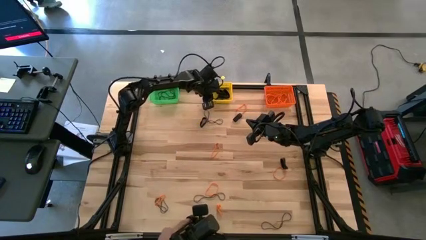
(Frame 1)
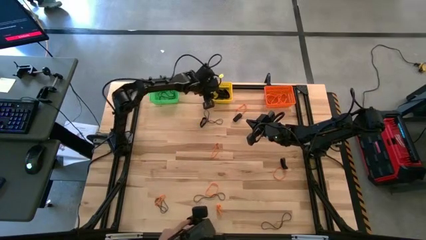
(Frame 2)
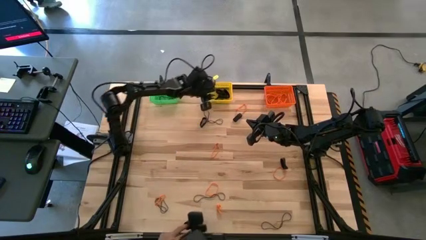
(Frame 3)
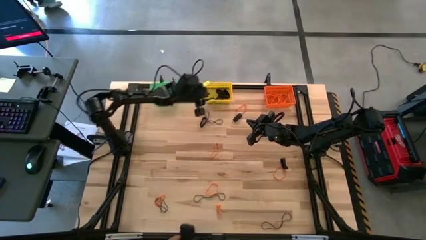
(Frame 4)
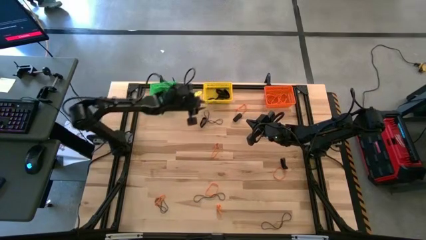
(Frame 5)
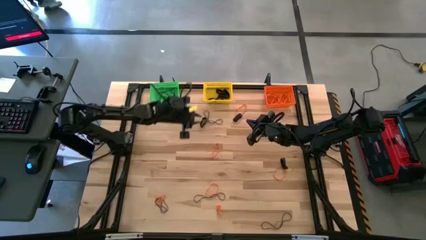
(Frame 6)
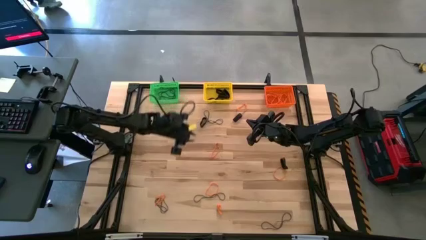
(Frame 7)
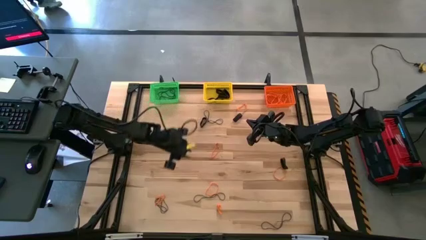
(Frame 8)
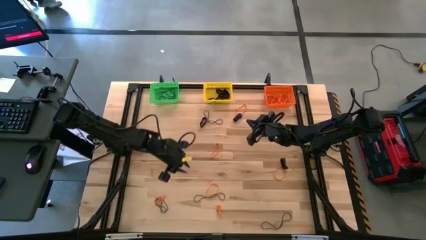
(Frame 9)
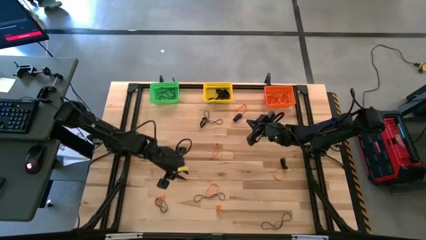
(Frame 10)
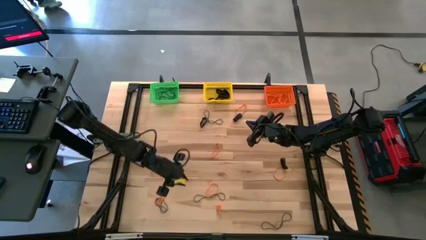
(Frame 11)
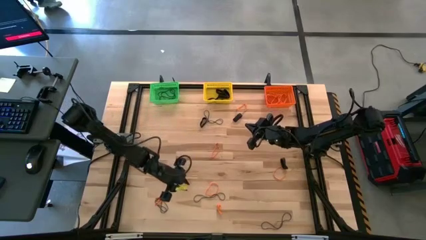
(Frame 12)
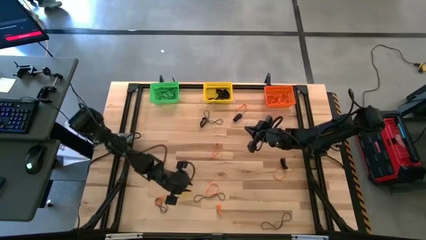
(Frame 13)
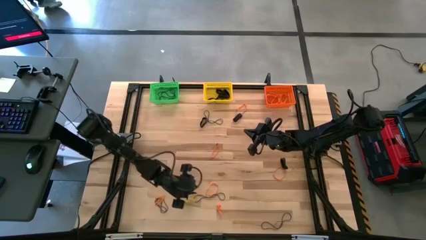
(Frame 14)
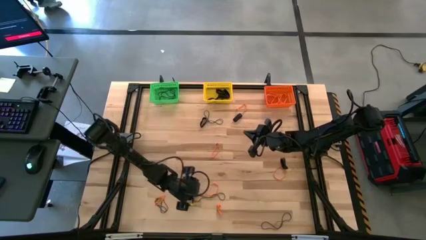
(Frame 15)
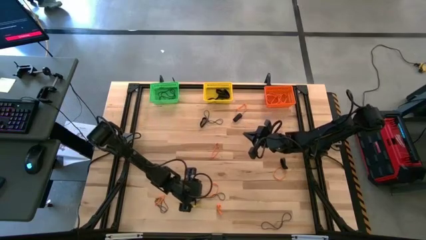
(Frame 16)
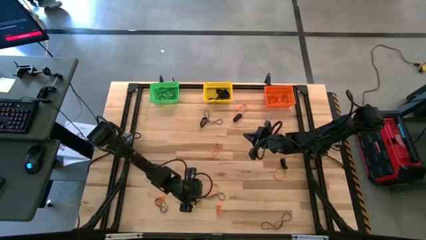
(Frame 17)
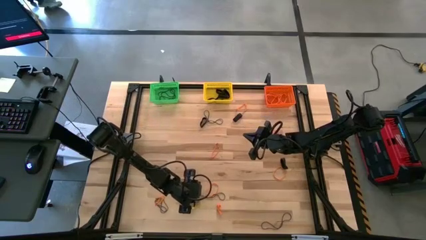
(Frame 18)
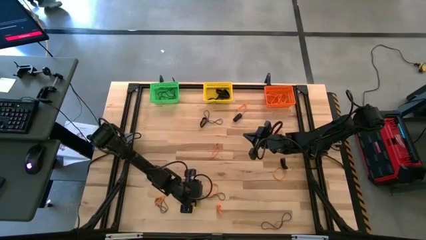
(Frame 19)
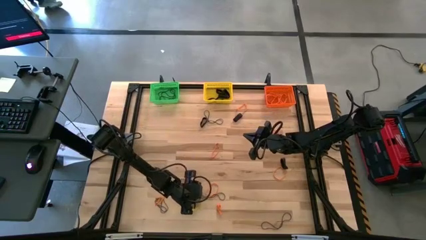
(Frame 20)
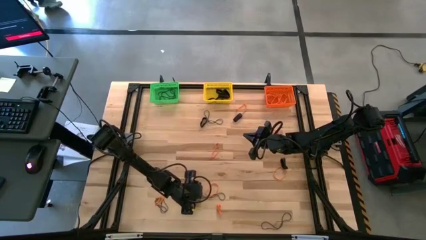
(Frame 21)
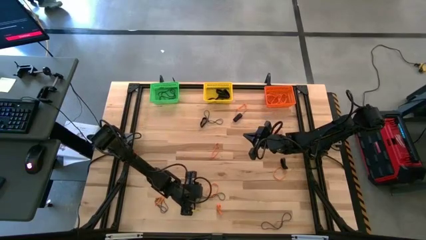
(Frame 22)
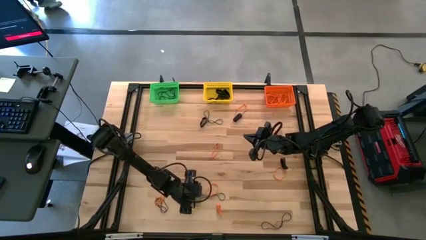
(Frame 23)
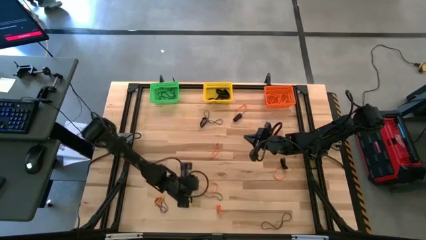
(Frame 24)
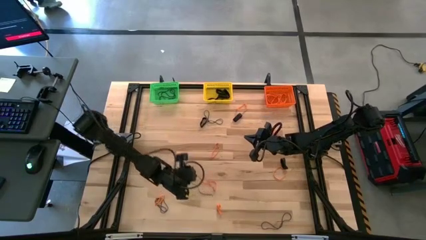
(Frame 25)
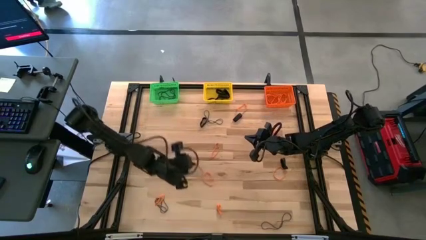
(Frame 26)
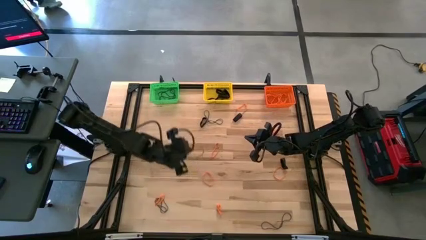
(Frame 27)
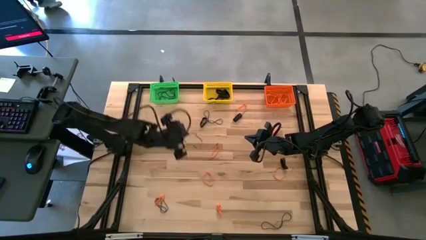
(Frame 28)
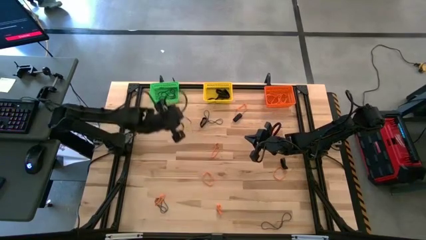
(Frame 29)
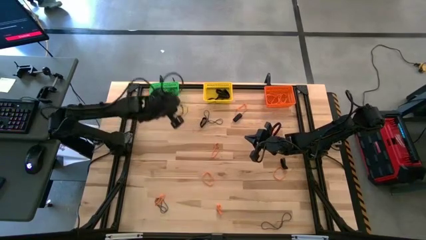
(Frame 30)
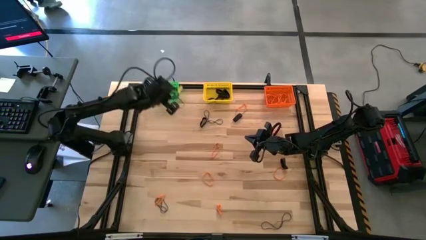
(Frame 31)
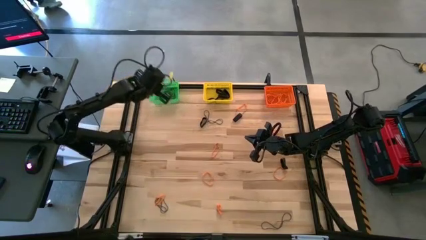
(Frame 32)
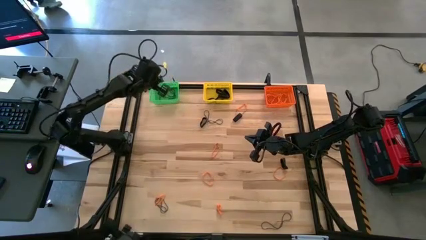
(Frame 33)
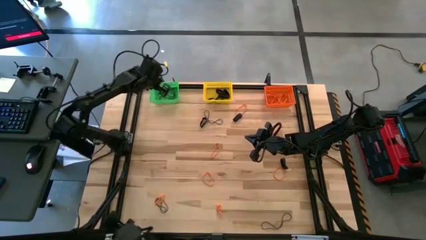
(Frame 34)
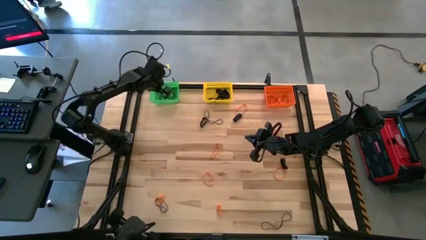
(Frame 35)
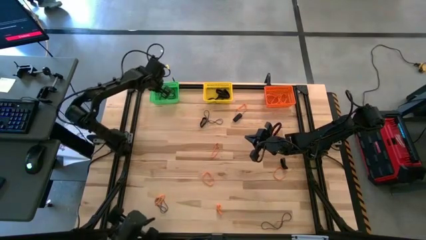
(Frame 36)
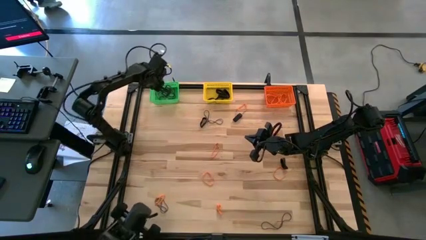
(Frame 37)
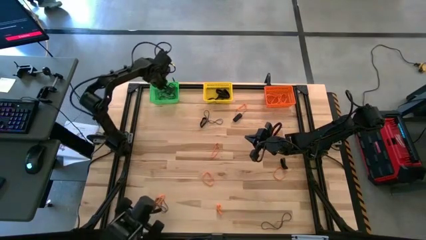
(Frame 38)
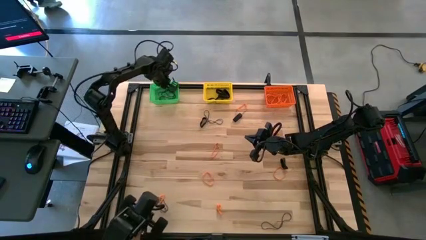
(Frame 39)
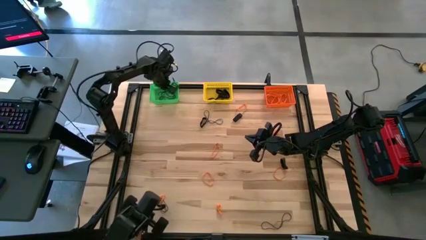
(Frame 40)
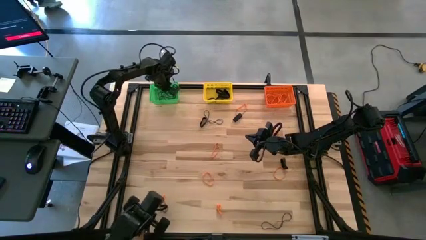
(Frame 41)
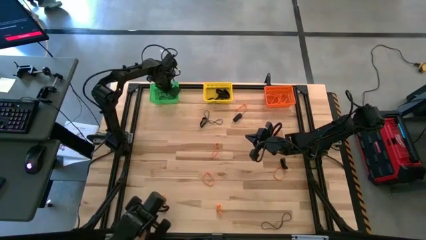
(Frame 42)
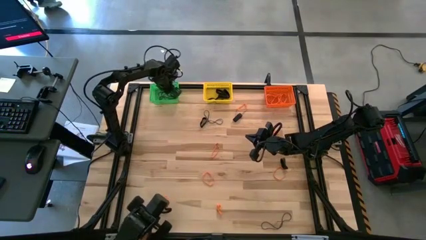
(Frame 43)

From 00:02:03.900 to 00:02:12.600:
Task: Sort rubber bands into baskets
Put the purple rubber band into the green bin

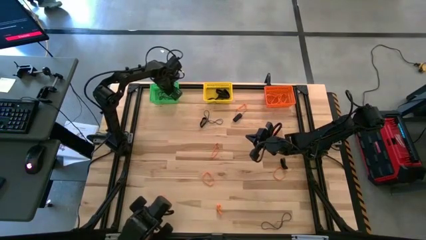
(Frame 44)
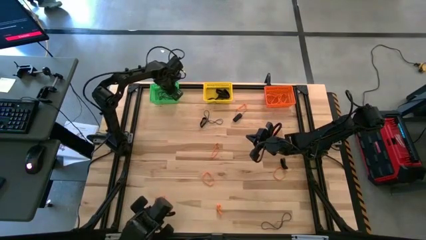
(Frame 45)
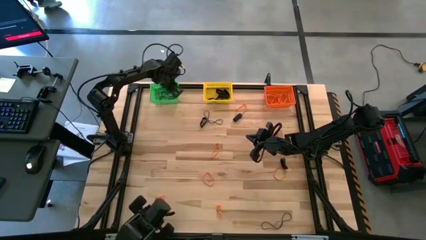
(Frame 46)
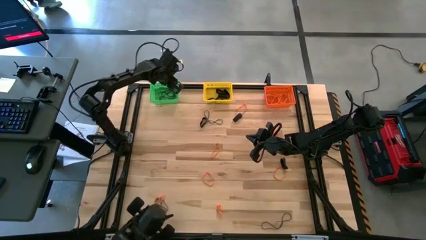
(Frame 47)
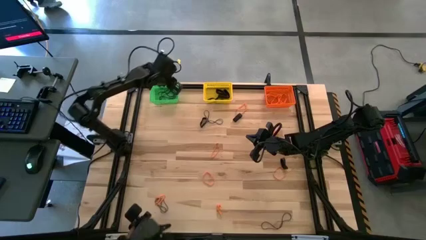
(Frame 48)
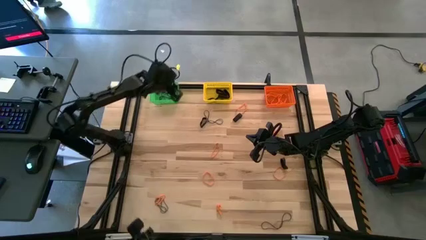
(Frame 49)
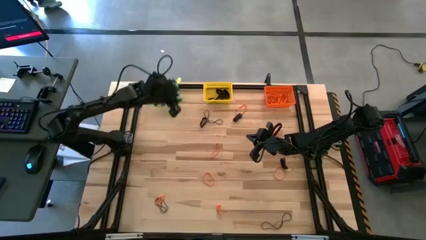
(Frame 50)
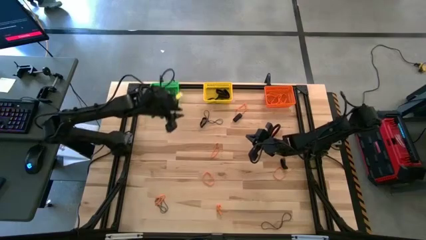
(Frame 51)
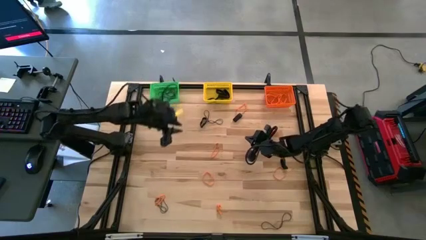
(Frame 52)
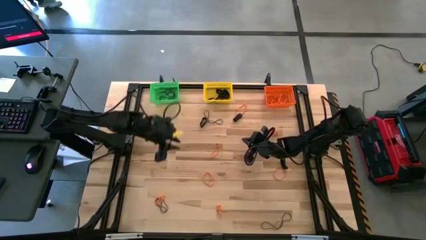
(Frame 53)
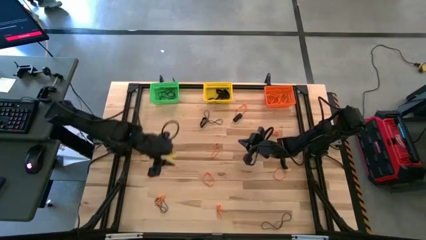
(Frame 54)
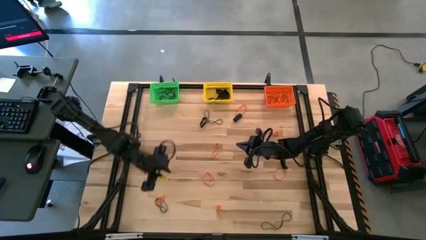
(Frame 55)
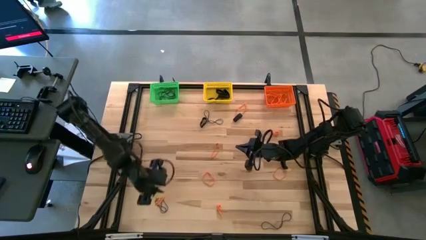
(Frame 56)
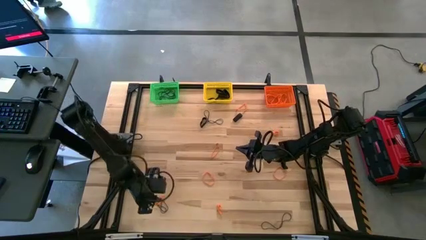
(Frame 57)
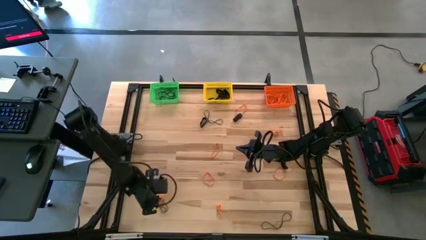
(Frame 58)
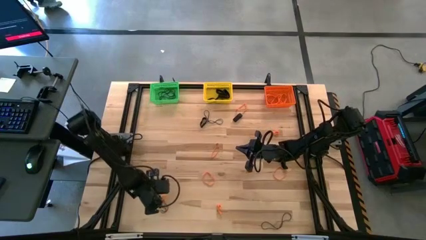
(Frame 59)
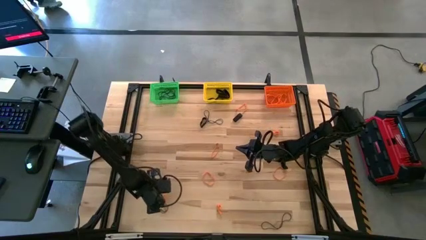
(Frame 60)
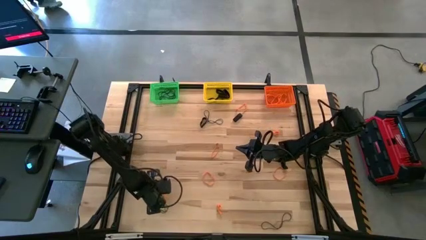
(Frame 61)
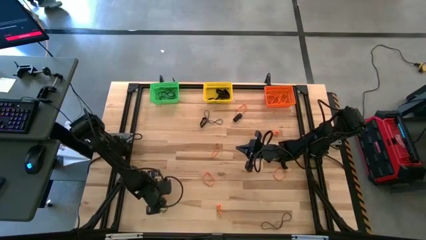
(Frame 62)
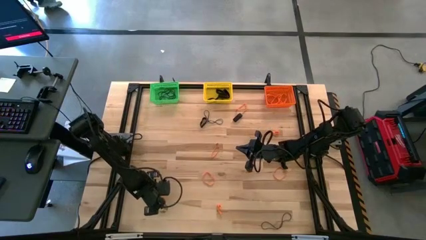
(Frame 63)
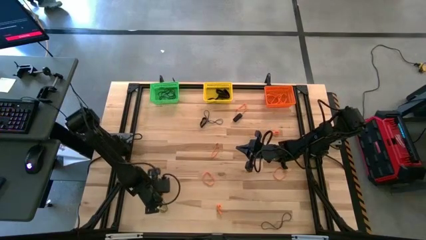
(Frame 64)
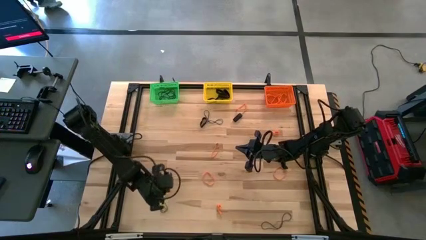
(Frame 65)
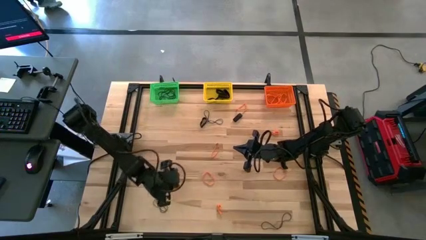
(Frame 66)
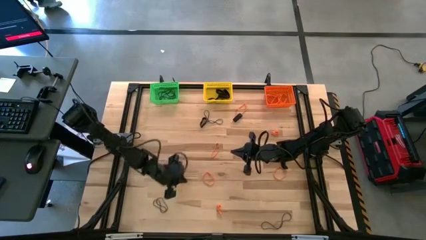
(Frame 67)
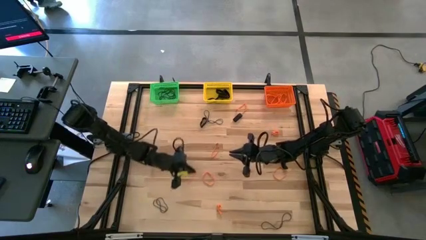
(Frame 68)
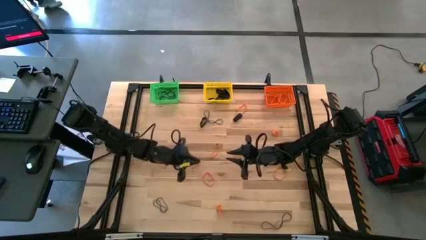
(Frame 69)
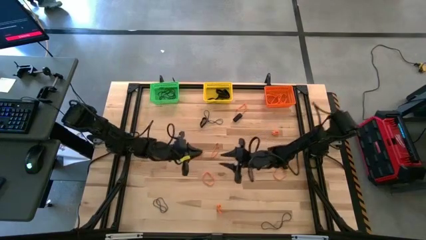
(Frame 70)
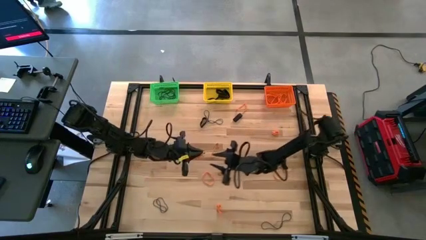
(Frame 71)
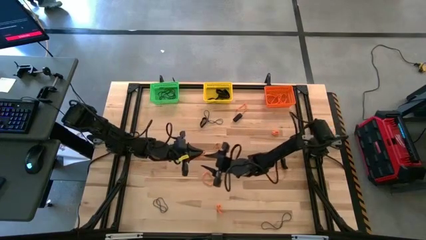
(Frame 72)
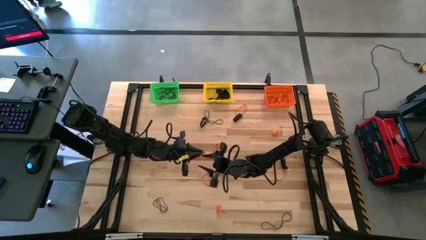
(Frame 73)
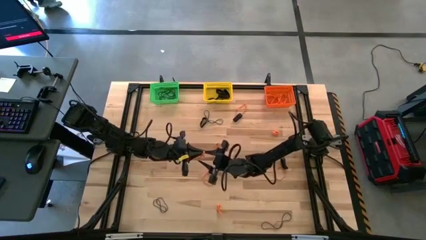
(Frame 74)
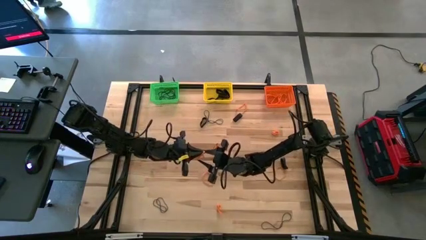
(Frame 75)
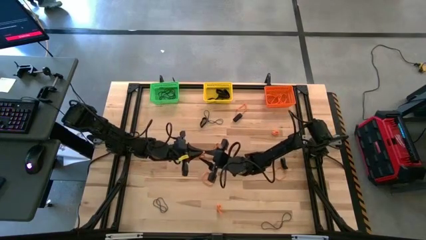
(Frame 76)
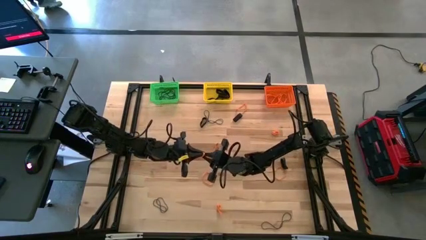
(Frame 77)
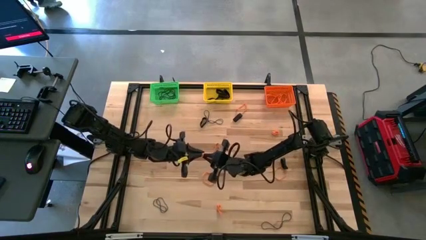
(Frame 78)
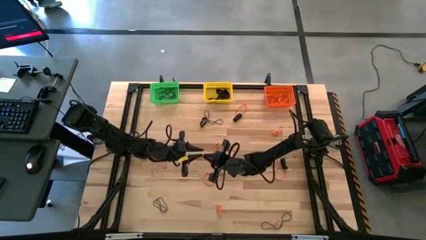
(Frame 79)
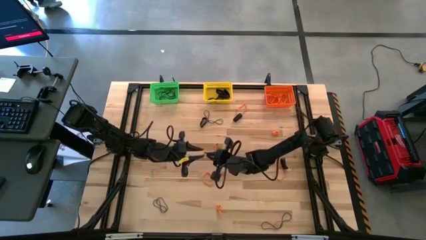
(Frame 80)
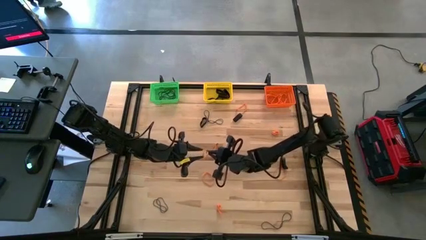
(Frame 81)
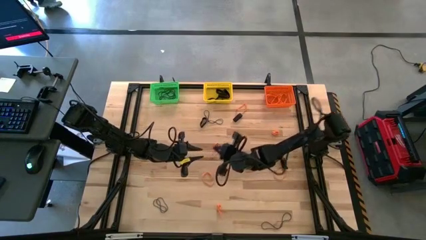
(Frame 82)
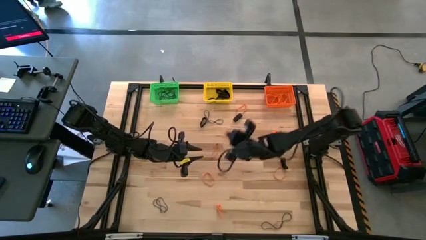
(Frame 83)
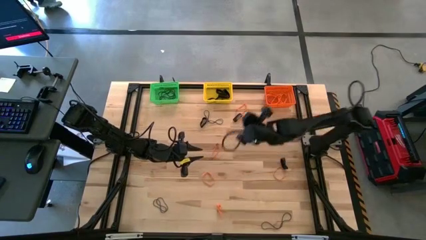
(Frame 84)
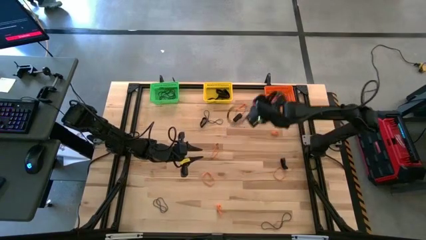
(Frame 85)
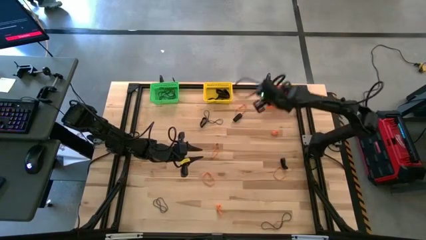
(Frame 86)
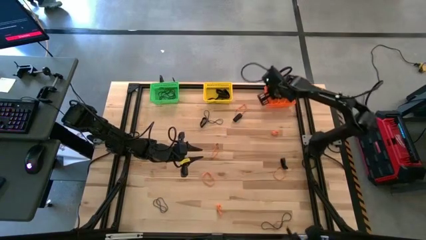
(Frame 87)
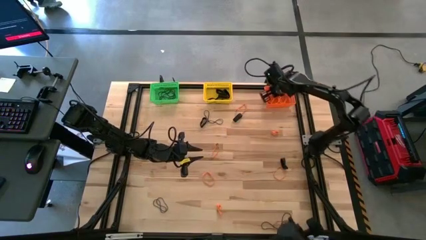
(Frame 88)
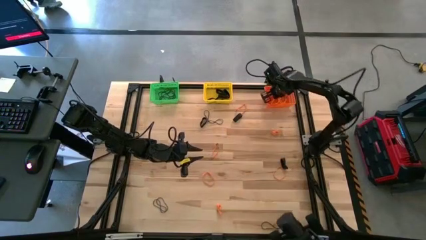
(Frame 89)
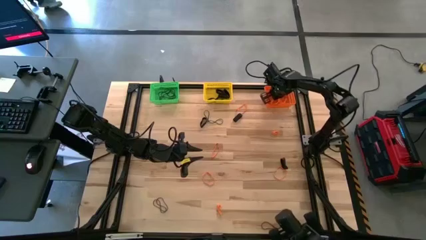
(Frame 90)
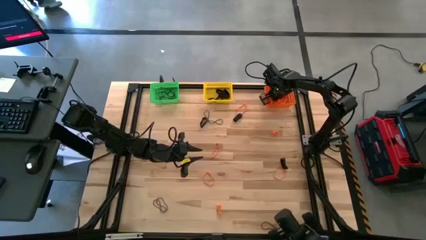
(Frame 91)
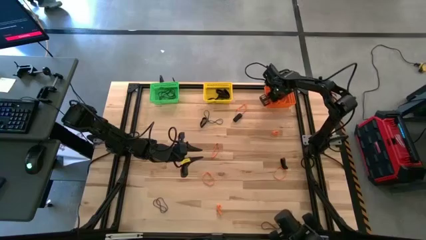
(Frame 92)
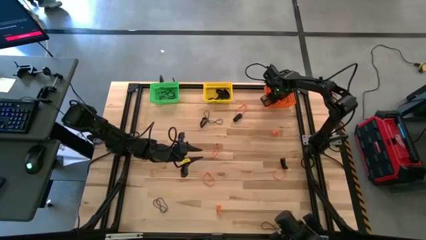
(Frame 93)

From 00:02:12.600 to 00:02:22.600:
Put the orange rubber band into the orange bin
